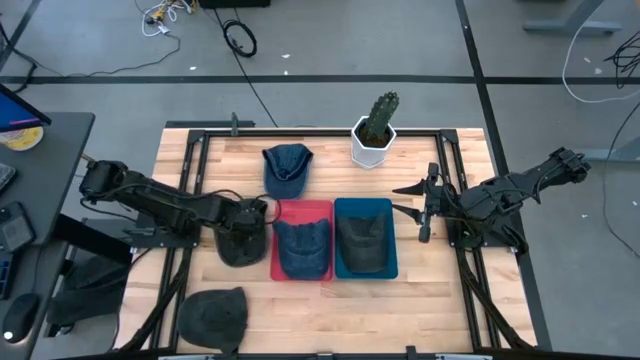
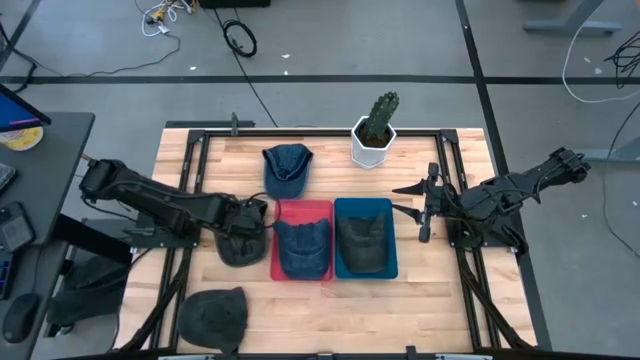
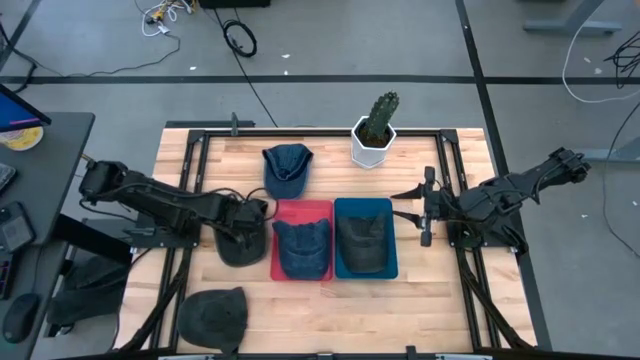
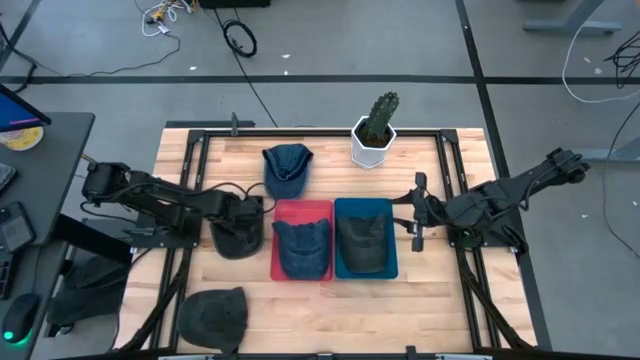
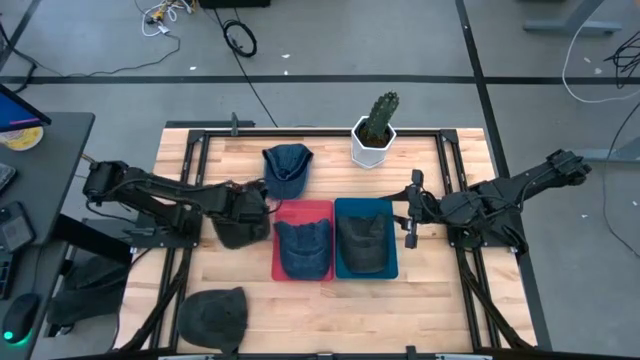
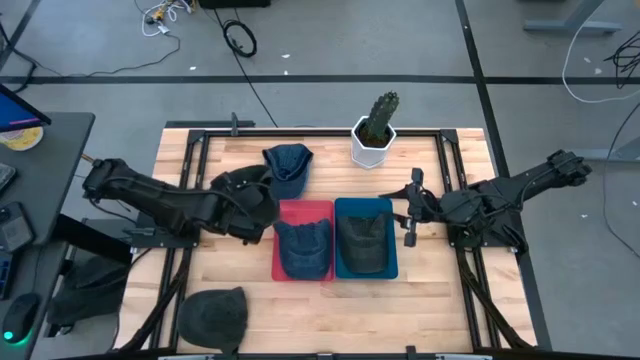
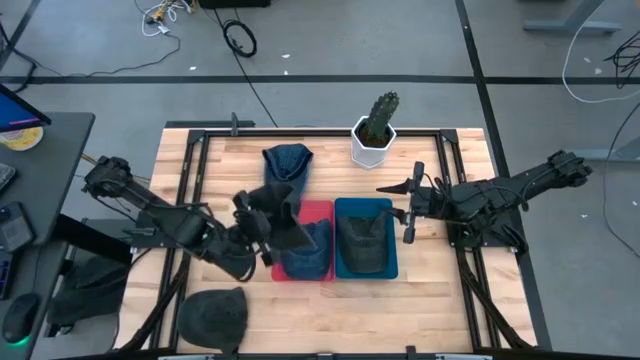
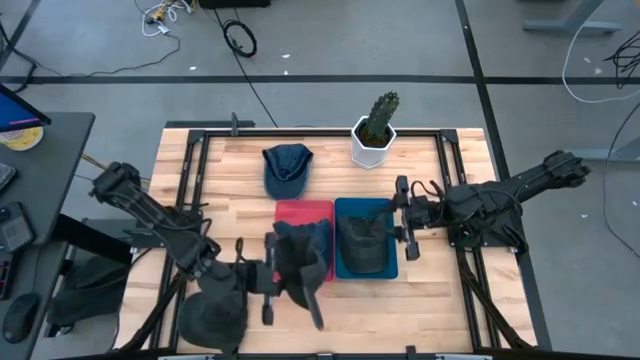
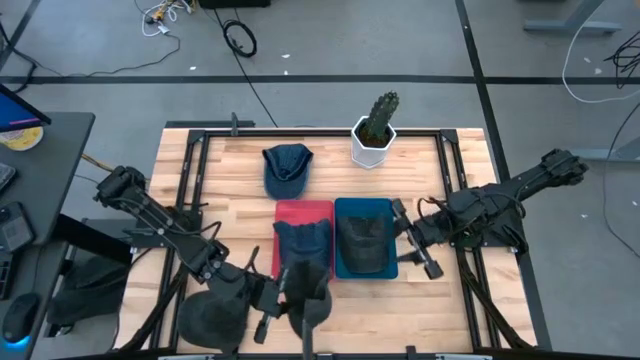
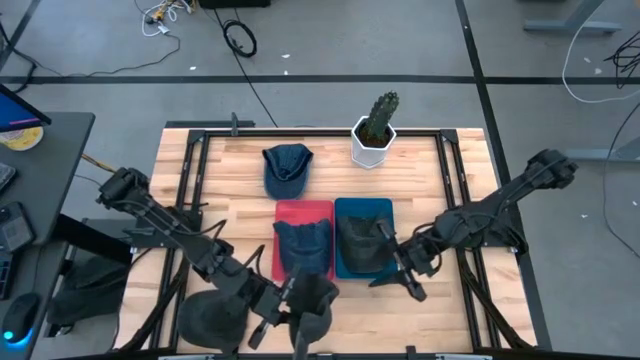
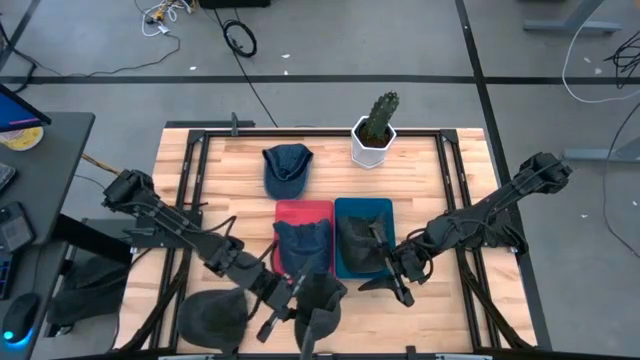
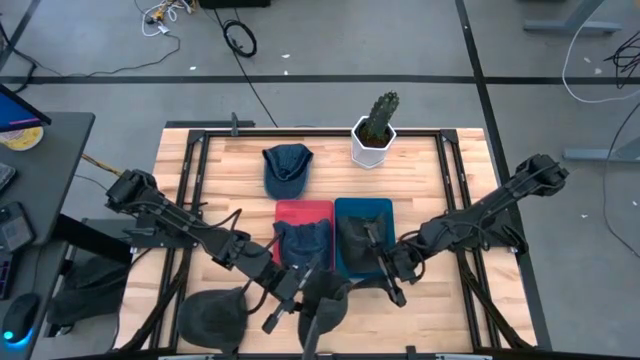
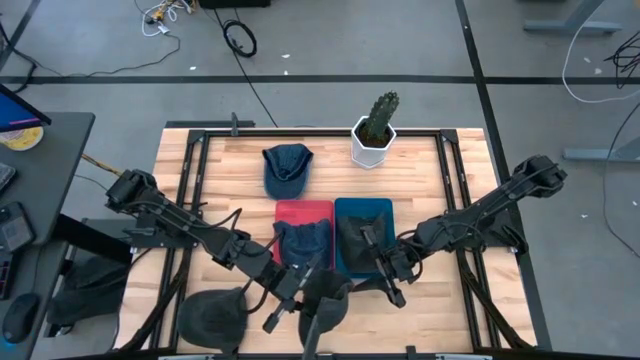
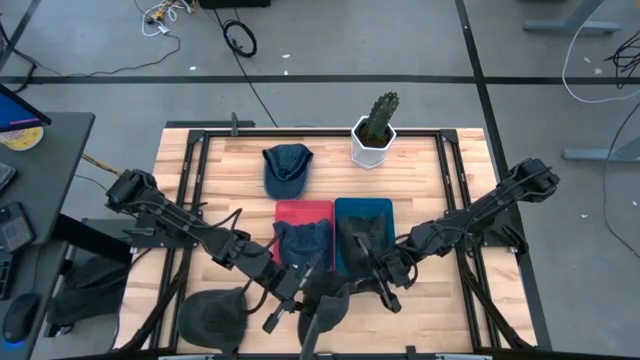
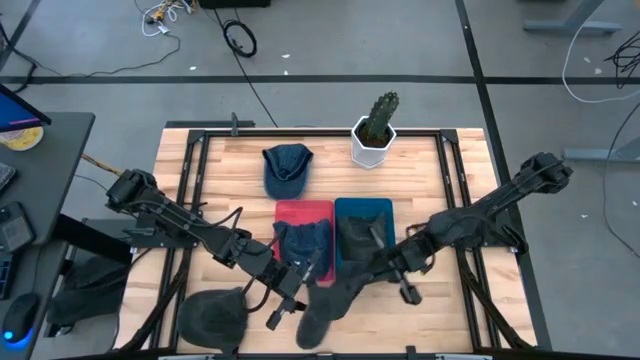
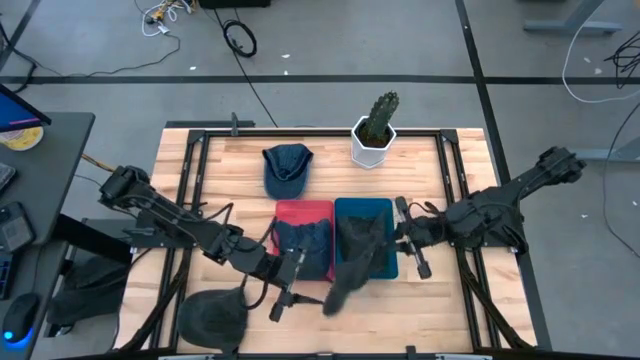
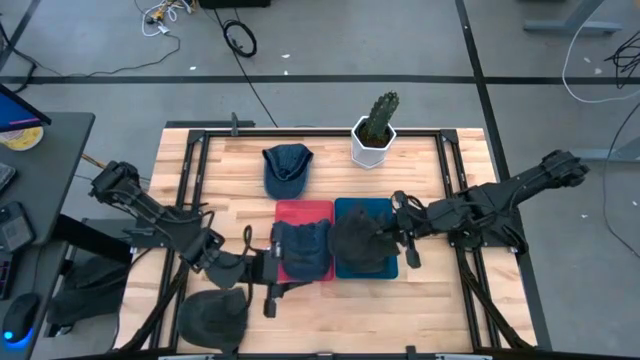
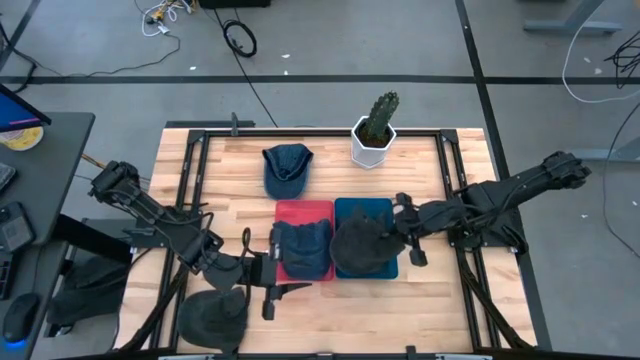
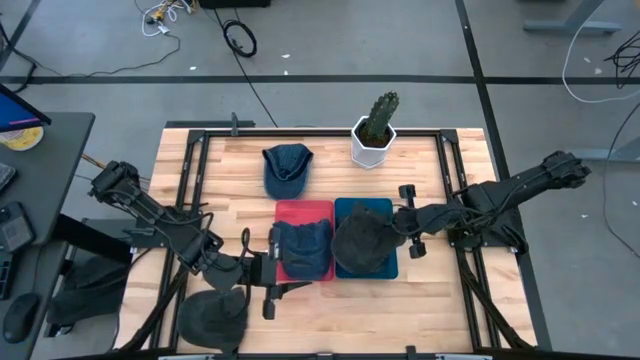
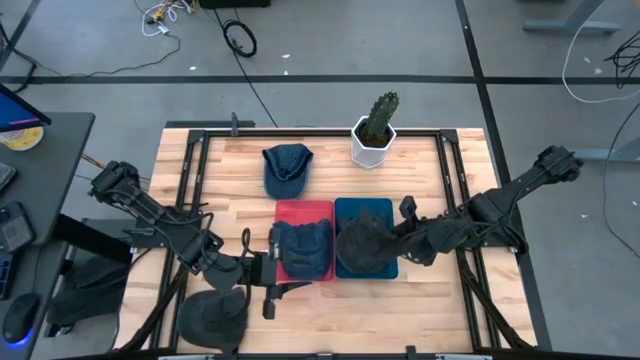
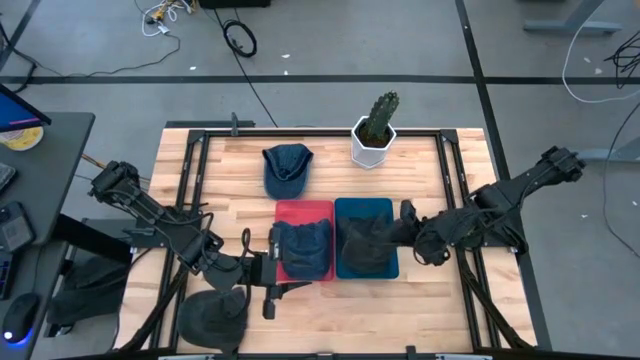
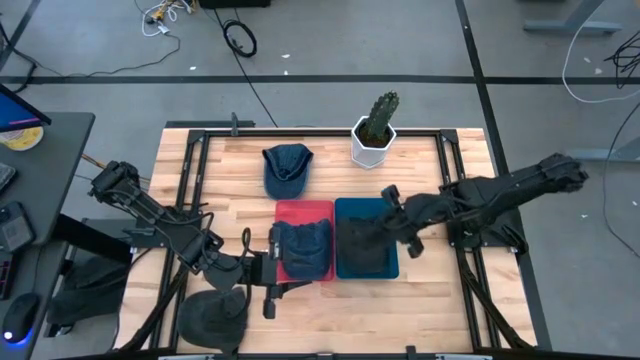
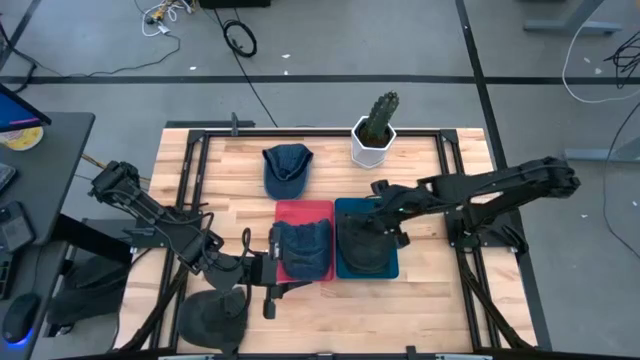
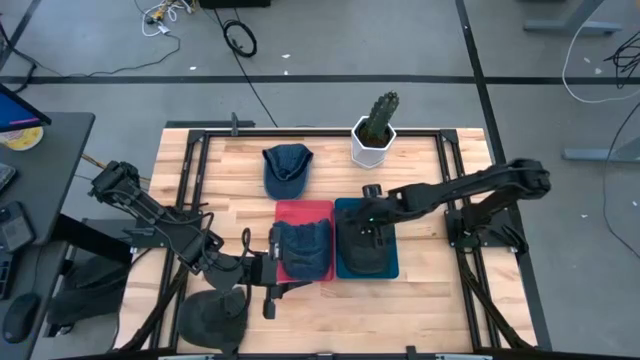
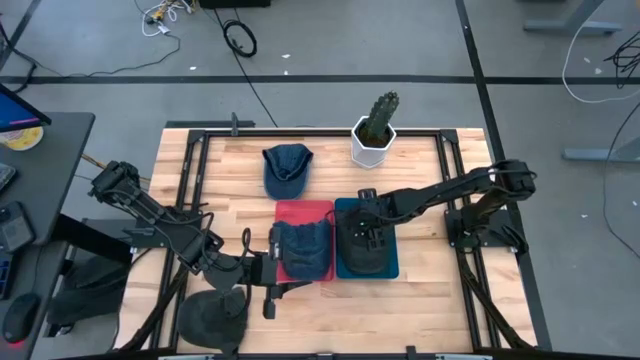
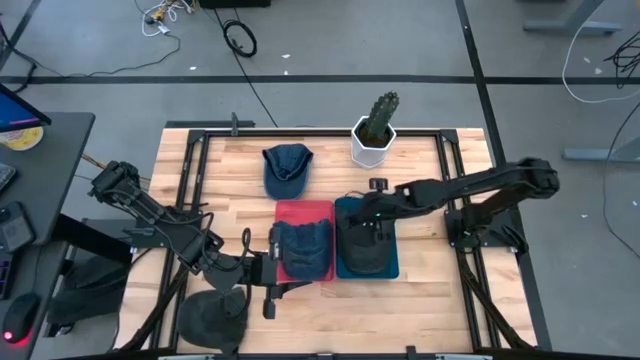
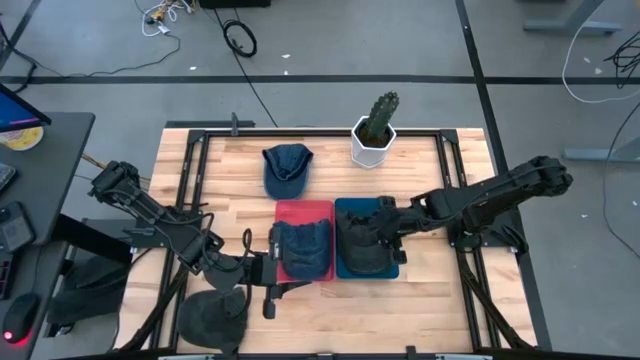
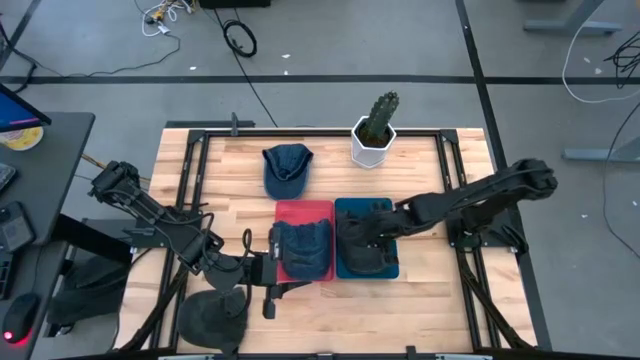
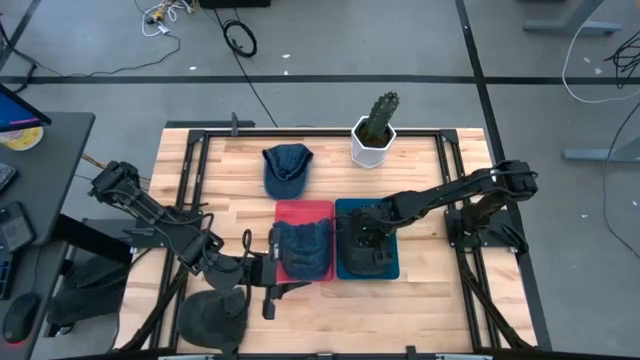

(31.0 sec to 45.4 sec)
Task: Pick & Place hat
Put the top gray cap into the blue bin

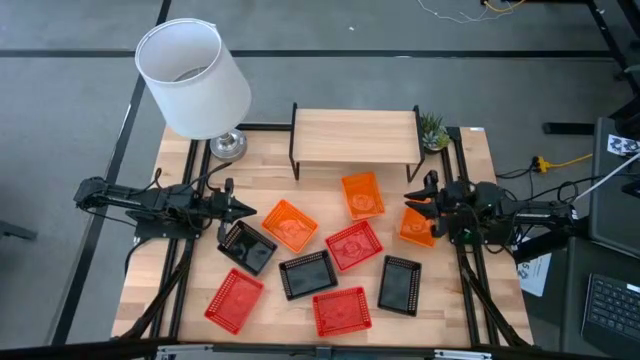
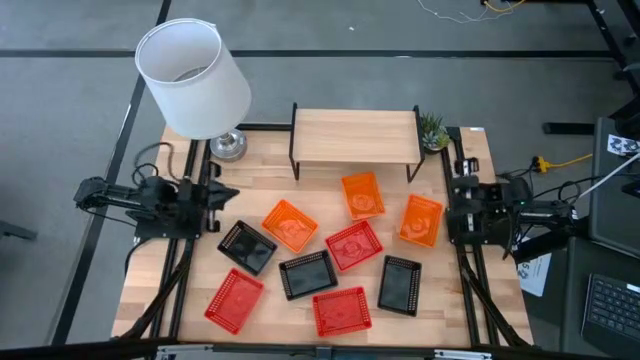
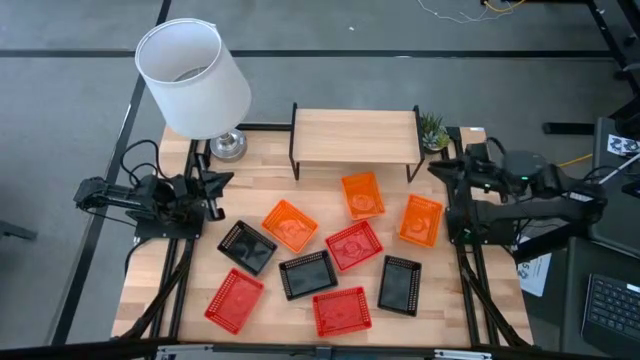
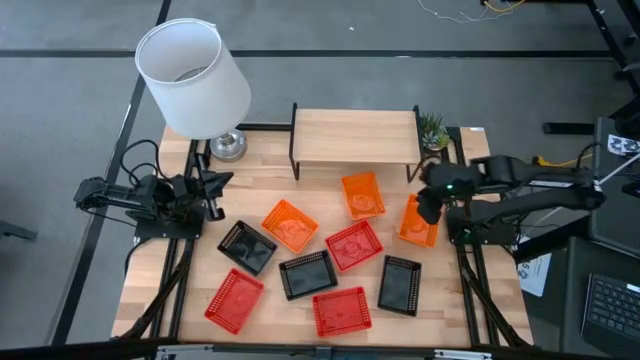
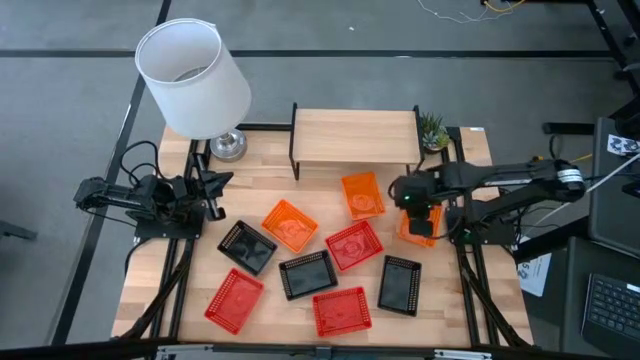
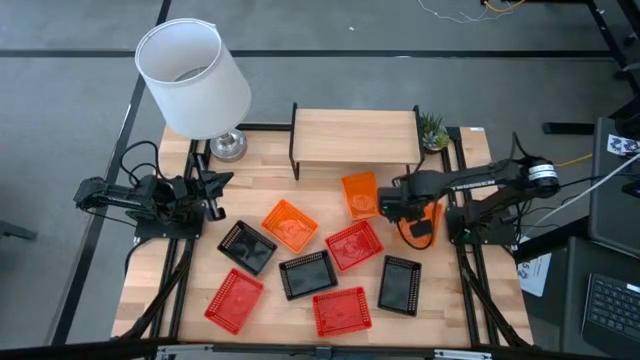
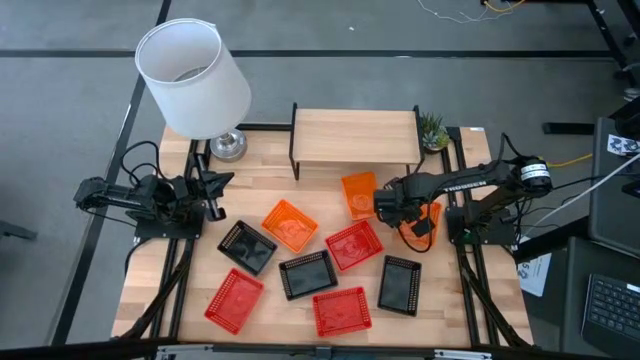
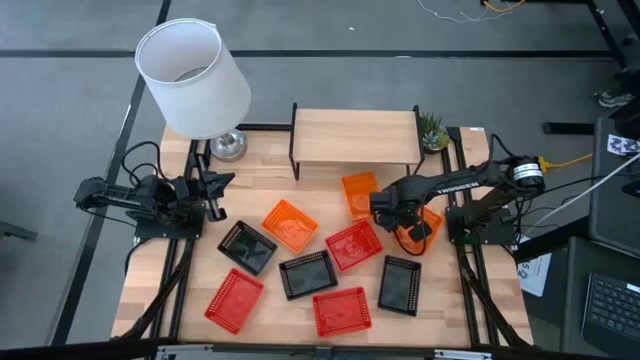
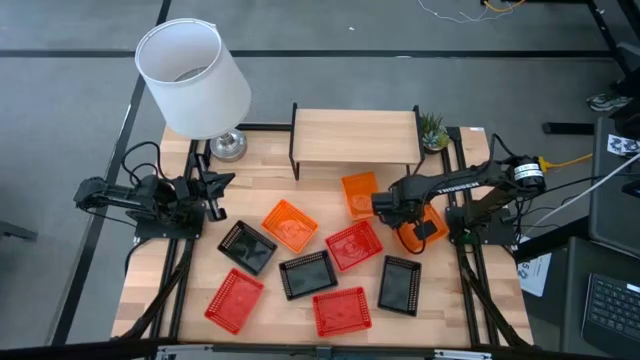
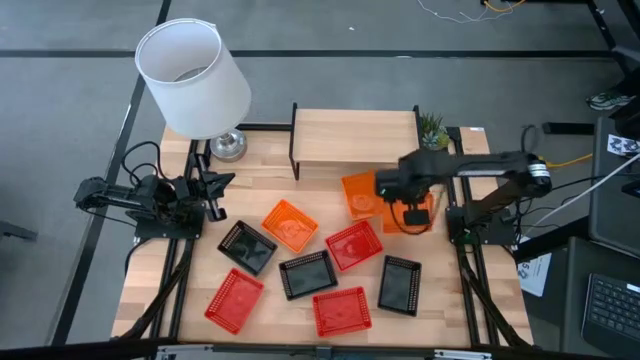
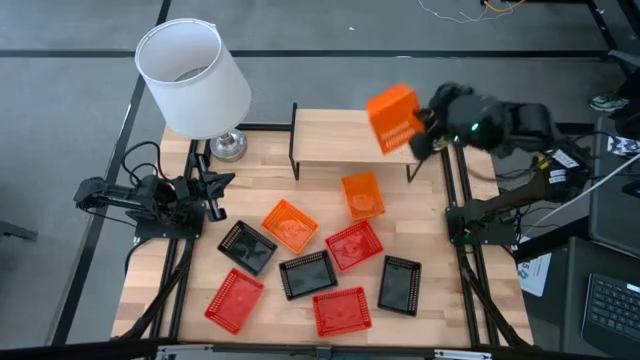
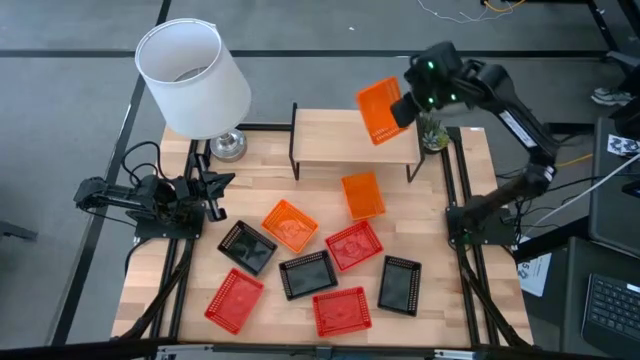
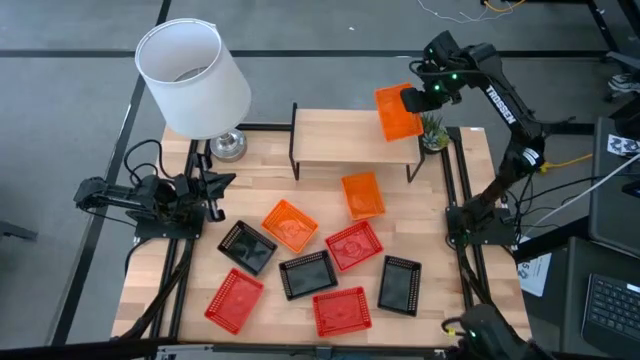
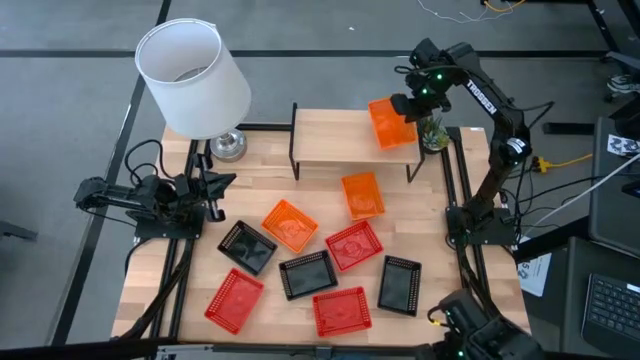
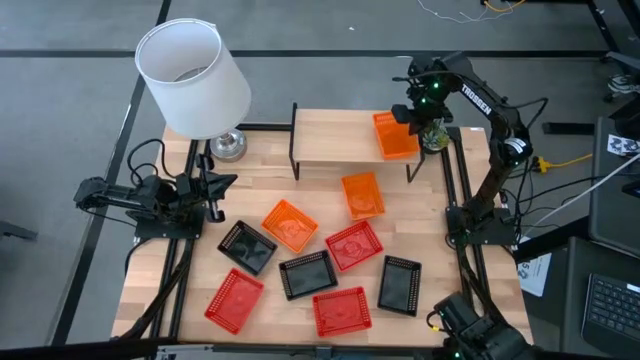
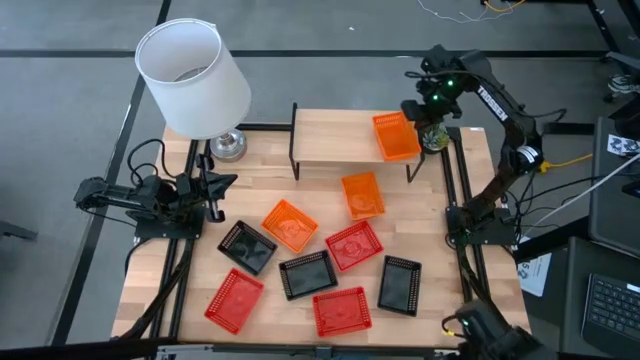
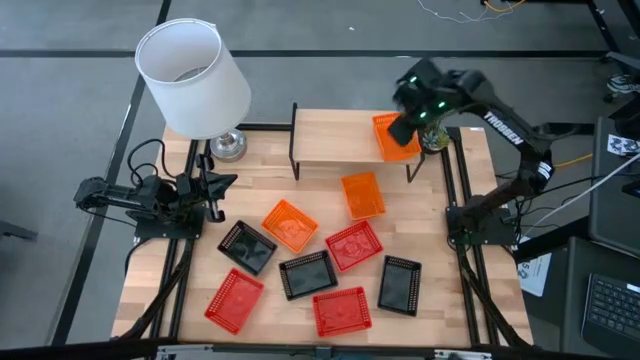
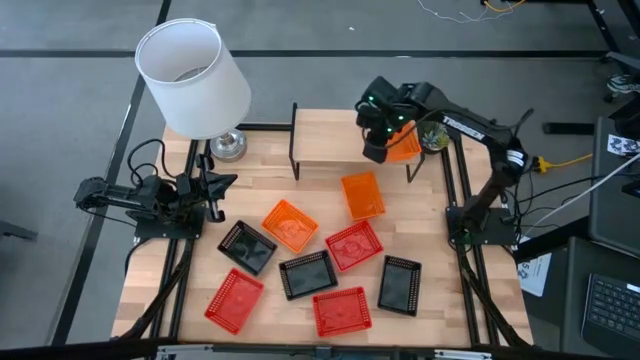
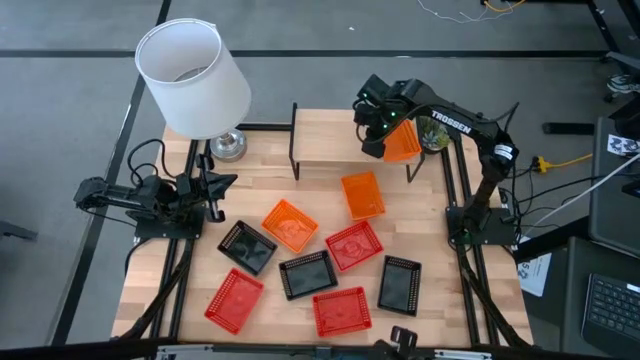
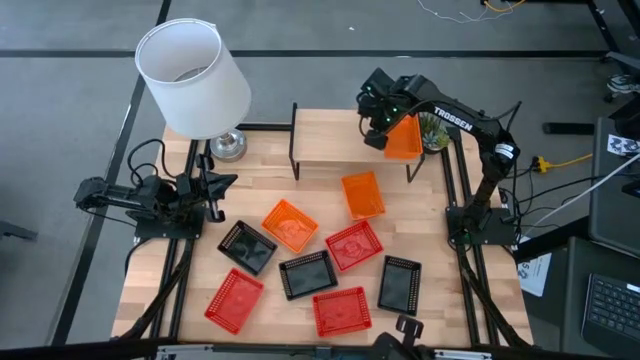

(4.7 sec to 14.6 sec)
Task: Stack baskets on shelf by color
Put the right orange bin on the shelf
